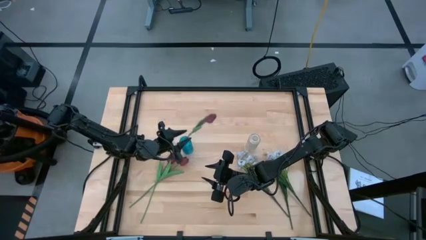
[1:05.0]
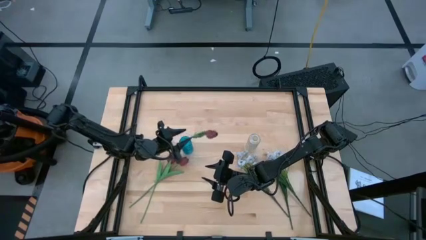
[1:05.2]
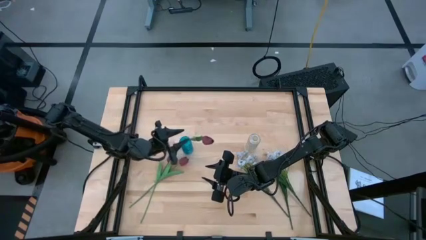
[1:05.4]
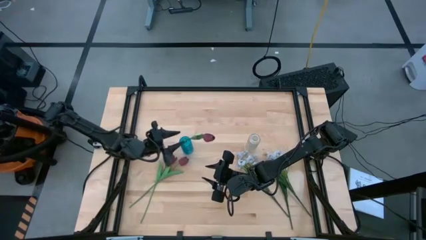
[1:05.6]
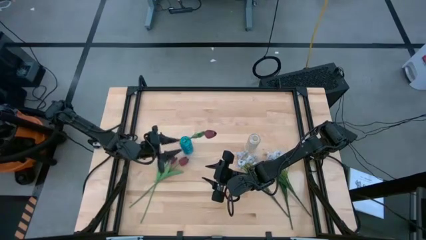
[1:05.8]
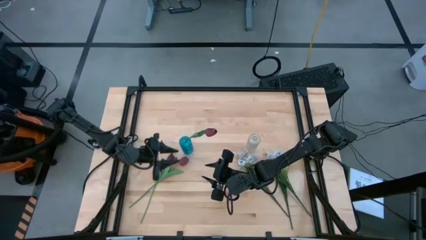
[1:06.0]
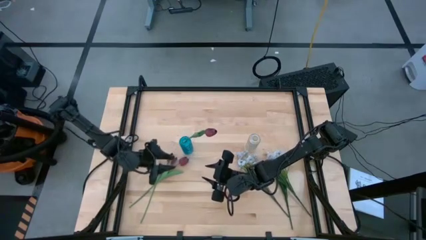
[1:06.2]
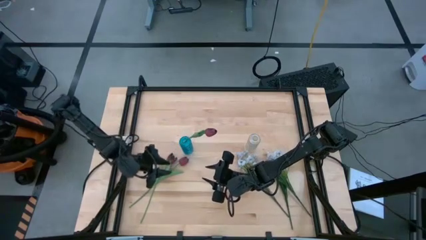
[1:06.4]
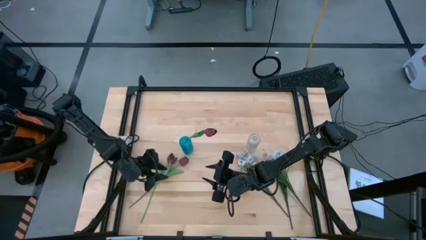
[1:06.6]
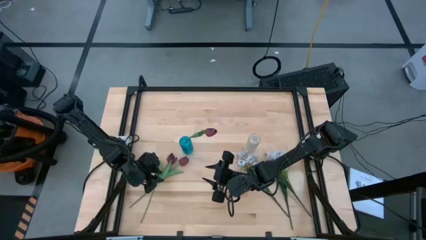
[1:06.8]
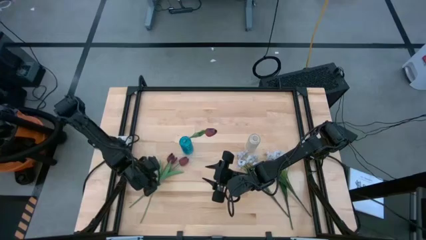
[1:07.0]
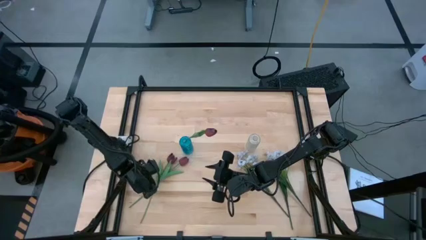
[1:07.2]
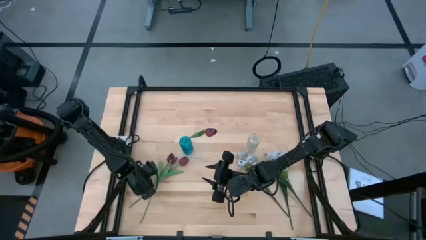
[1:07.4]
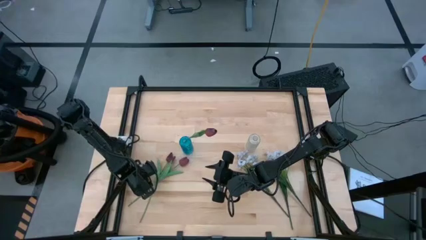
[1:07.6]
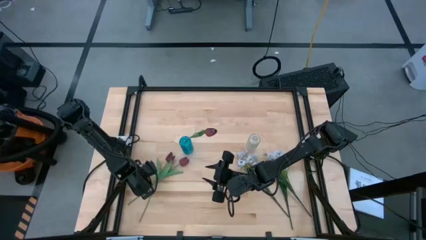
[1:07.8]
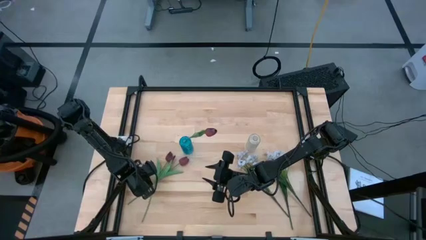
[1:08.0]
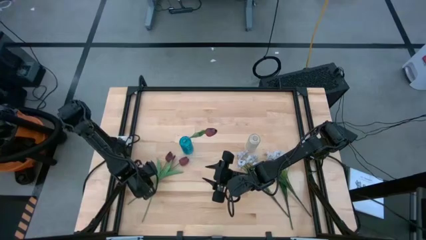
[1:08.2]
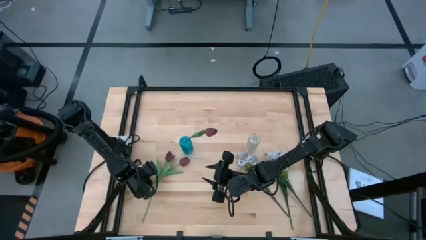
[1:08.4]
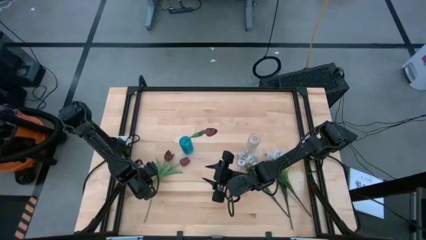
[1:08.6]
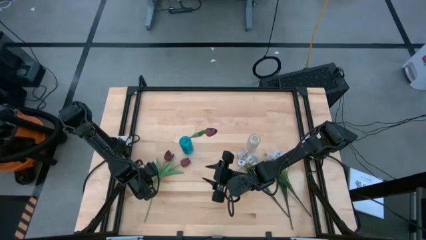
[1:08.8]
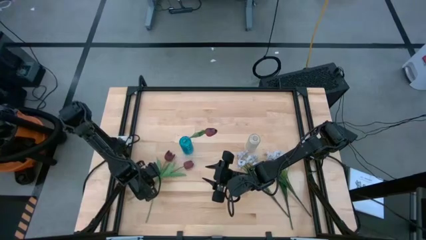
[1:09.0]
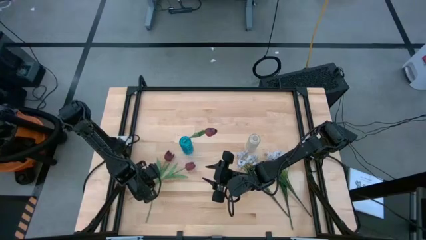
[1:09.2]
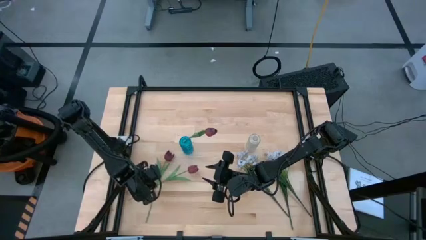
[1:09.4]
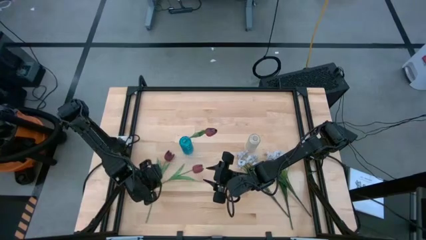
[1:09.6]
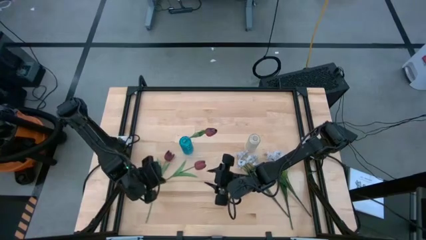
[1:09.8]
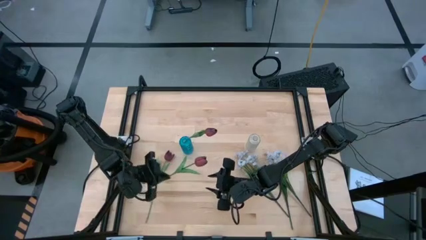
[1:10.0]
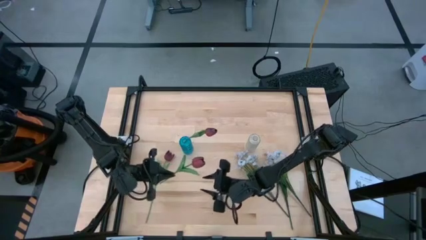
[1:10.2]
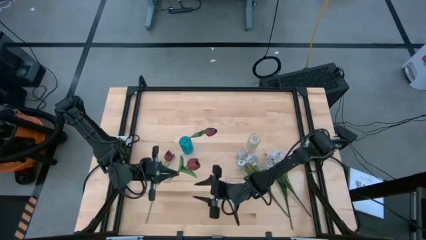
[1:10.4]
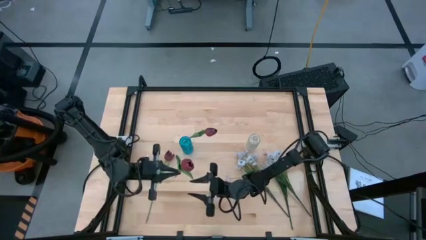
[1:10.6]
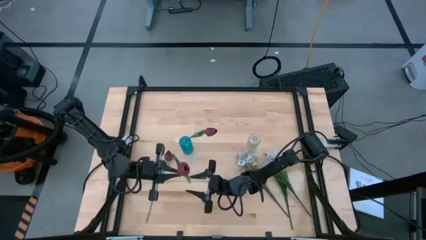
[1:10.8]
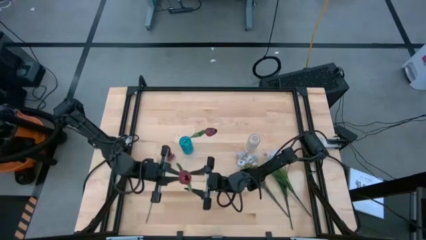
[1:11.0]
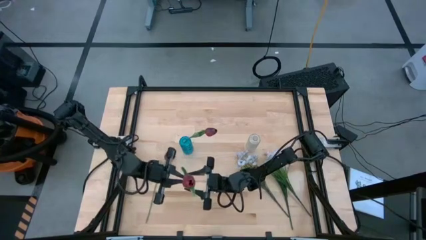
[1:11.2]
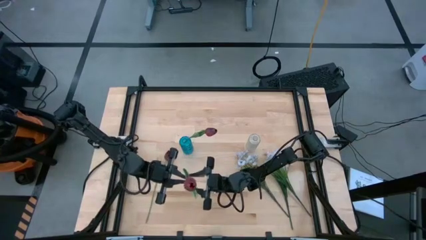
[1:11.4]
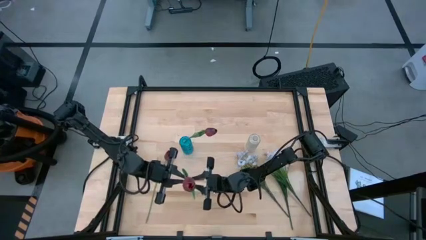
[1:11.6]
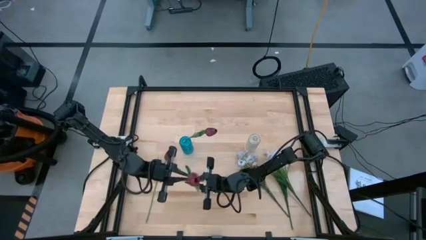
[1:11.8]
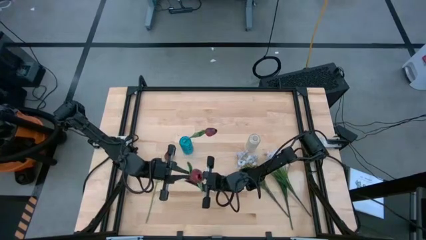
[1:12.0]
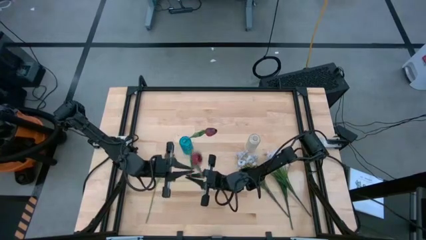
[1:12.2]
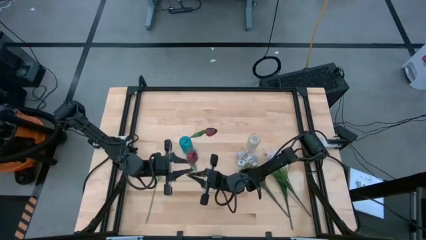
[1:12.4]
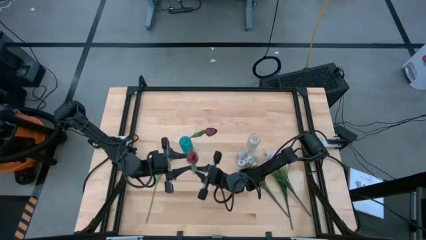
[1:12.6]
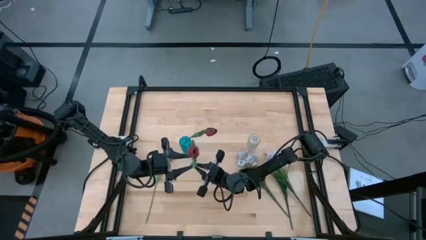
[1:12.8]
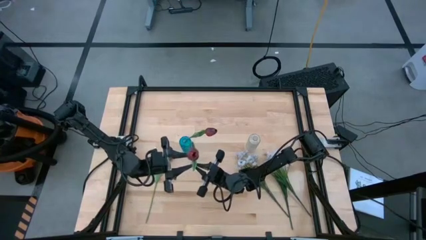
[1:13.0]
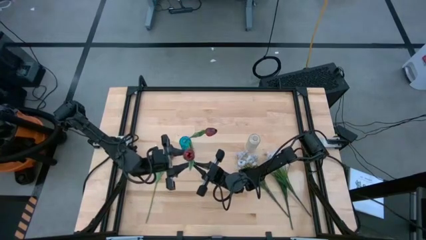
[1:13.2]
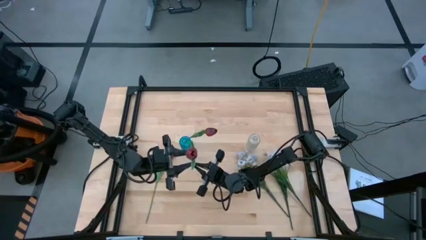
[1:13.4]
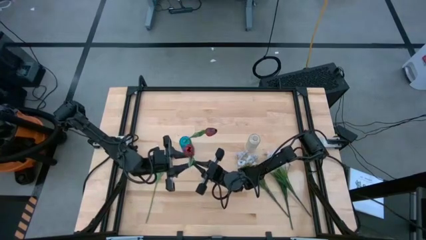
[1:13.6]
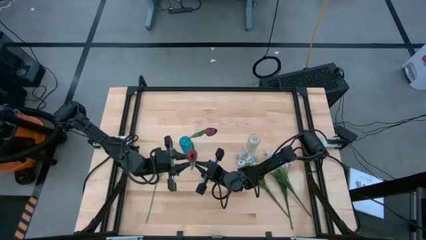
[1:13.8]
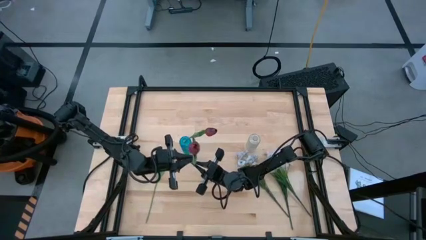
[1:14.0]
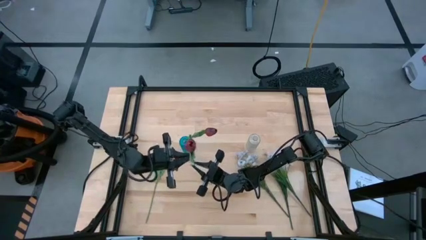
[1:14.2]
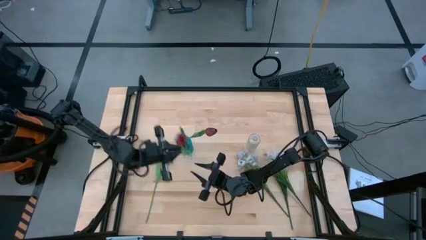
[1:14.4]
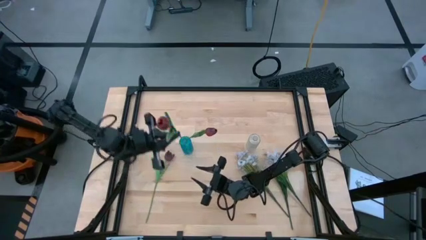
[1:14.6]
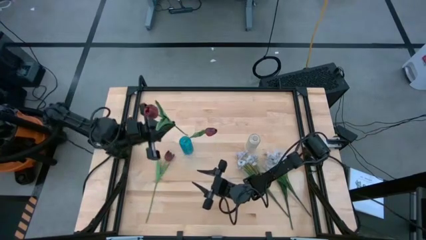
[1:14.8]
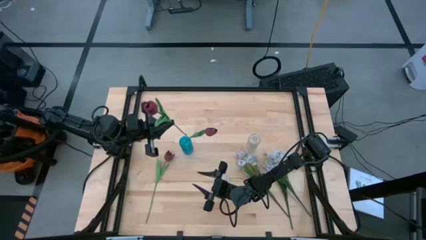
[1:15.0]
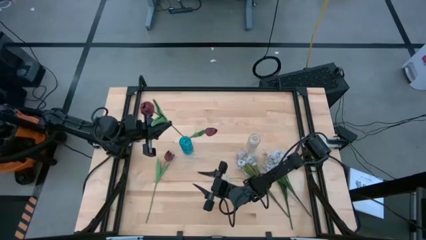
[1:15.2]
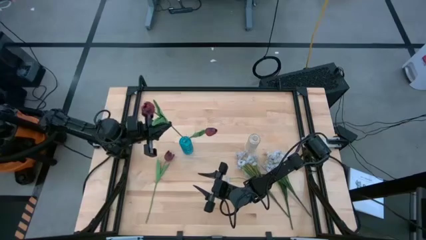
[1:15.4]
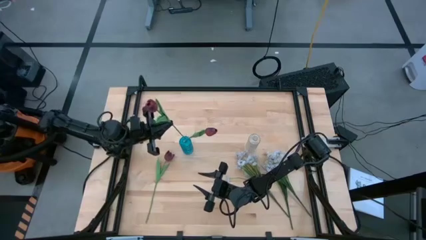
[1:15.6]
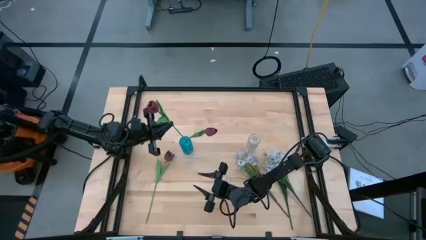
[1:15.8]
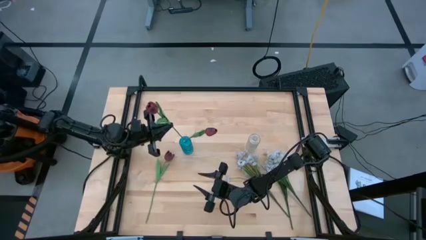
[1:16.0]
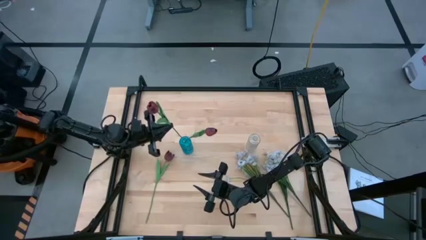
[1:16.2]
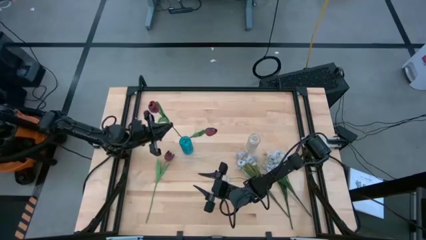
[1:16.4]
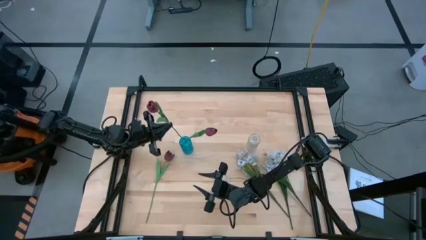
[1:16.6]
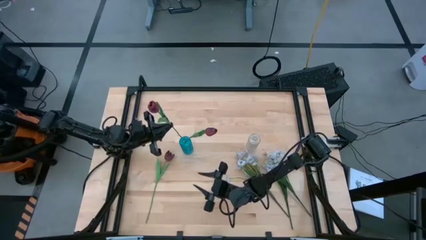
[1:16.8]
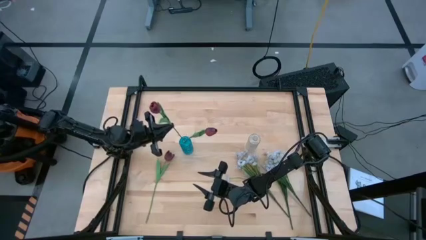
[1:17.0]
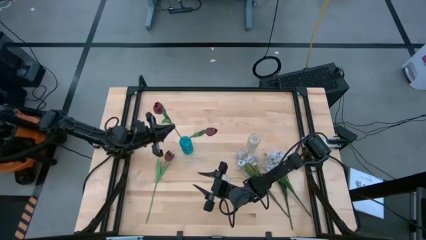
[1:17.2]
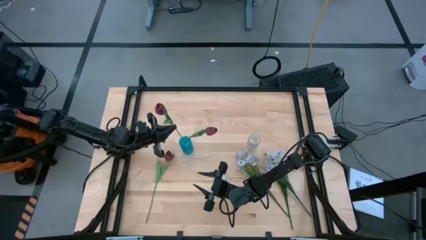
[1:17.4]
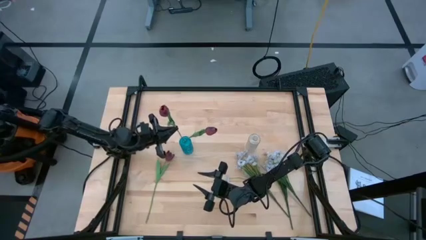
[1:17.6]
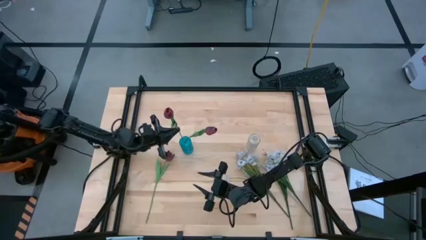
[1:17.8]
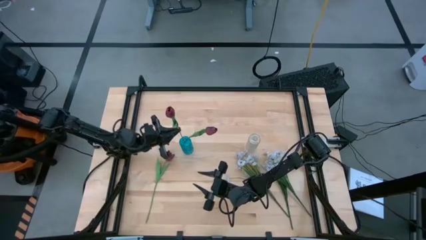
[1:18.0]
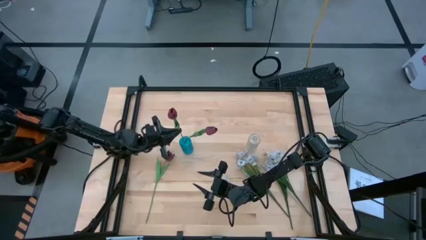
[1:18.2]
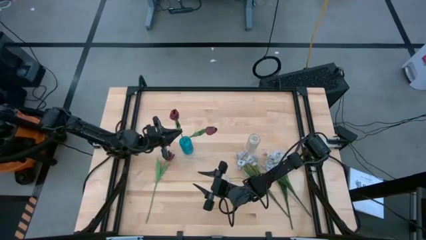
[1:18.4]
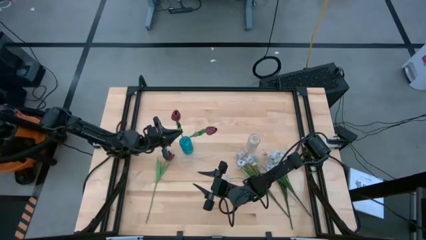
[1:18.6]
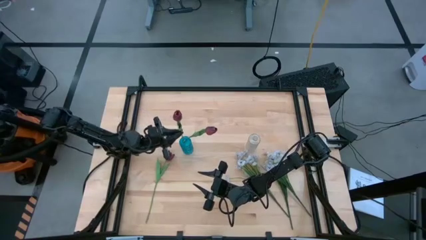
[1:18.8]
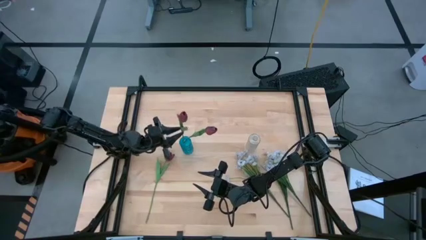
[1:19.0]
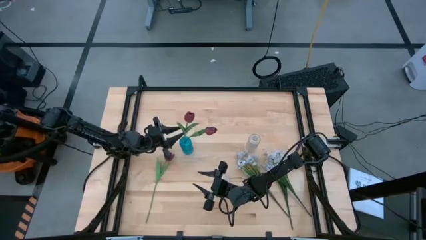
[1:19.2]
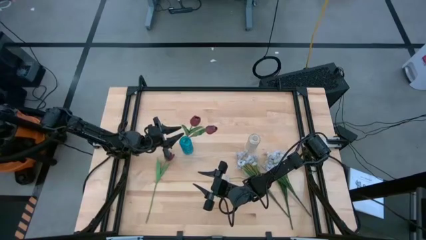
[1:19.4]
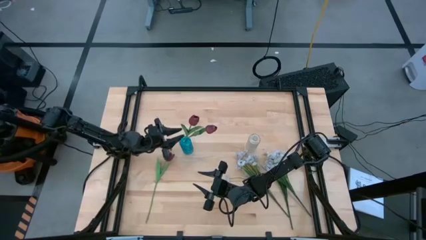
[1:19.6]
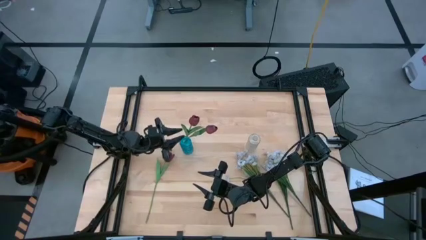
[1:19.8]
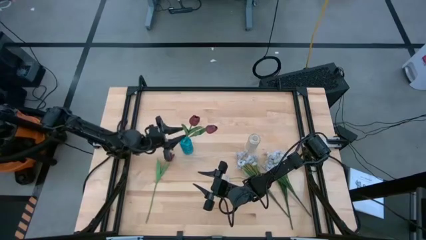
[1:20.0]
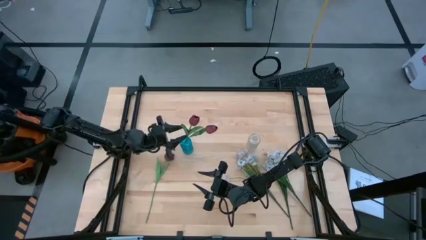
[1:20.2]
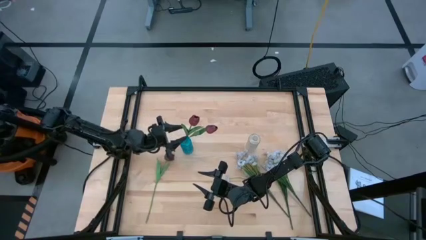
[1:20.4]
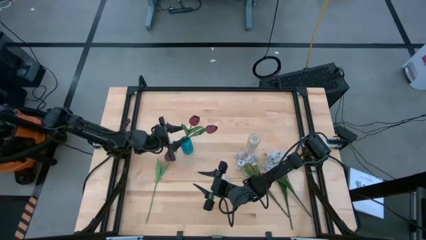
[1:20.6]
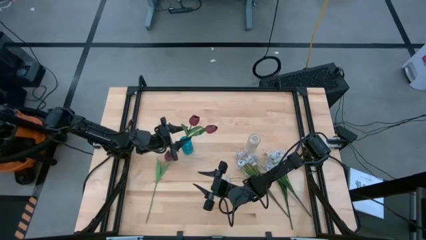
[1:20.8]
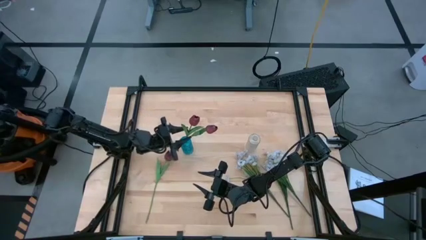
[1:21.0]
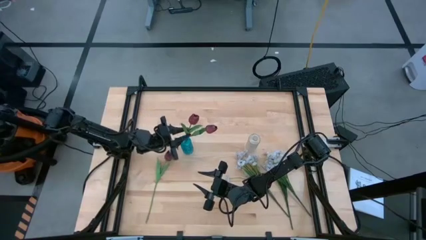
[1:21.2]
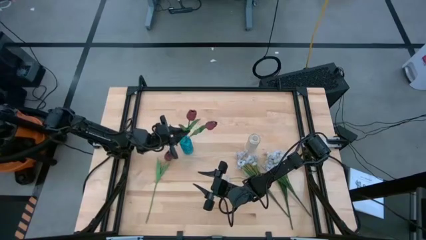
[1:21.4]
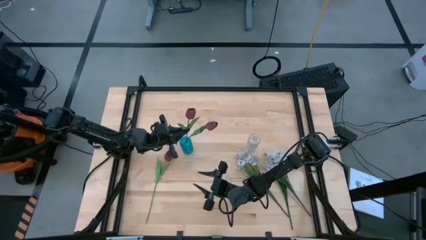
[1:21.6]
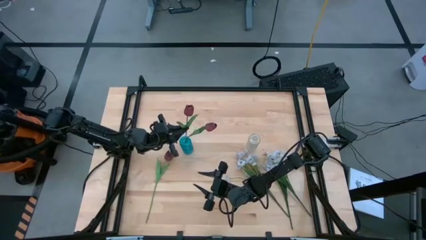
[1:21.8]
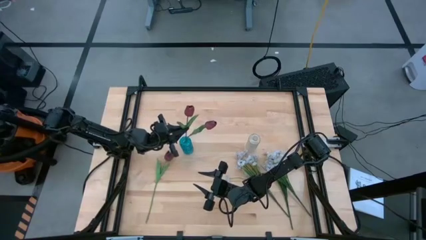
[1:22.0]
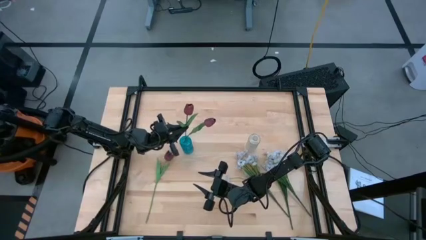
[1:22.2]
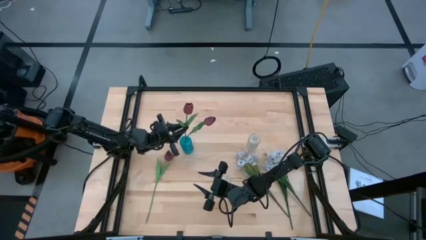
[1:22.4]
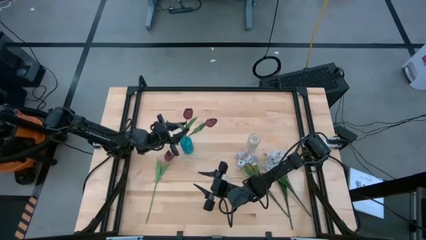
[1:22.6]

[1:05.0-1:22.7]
Task: Sort flowers into vase by color
Put the right red tulip into the blue vase
